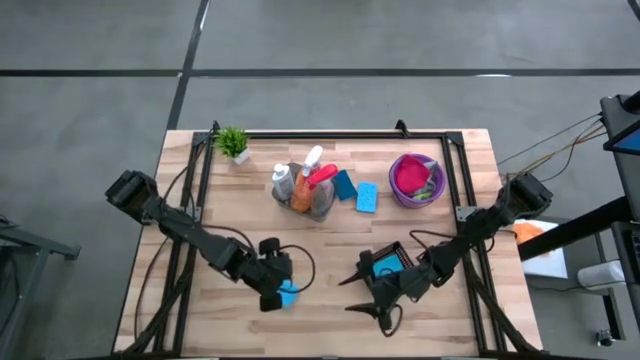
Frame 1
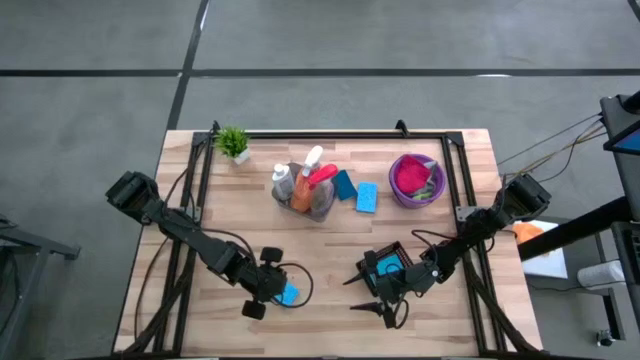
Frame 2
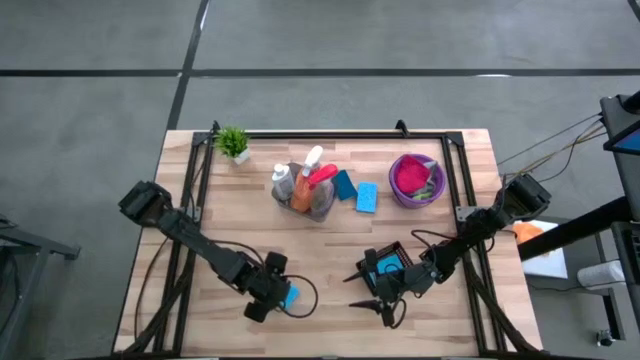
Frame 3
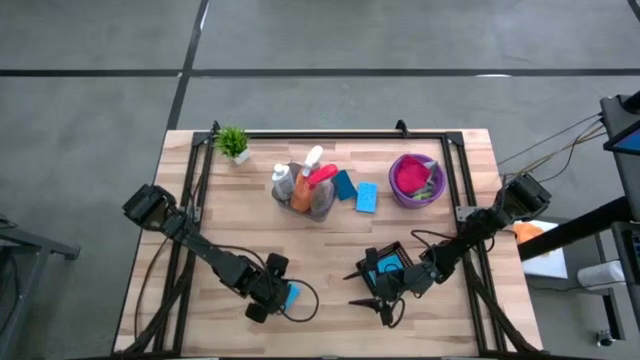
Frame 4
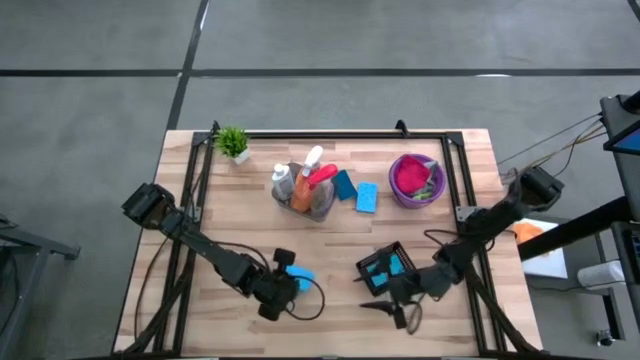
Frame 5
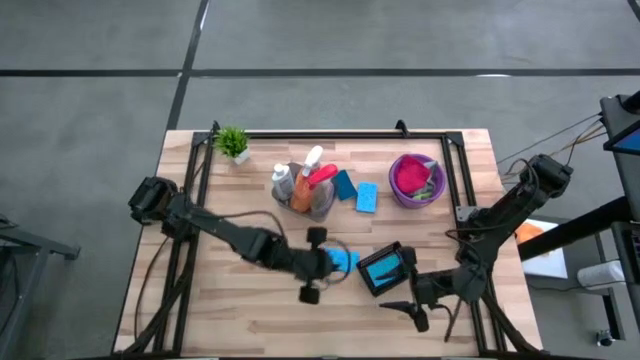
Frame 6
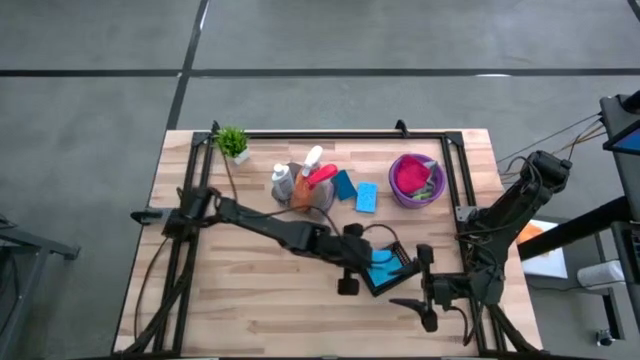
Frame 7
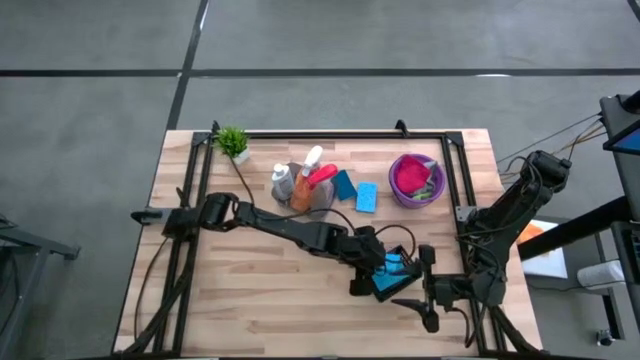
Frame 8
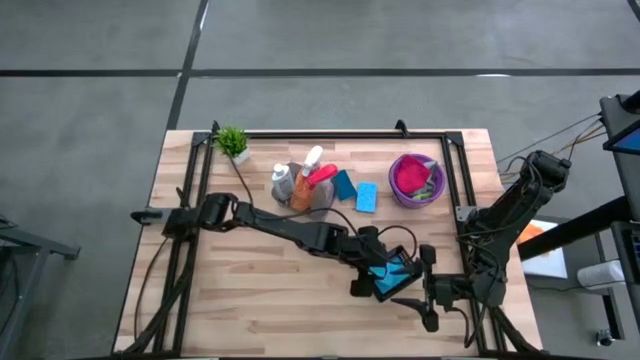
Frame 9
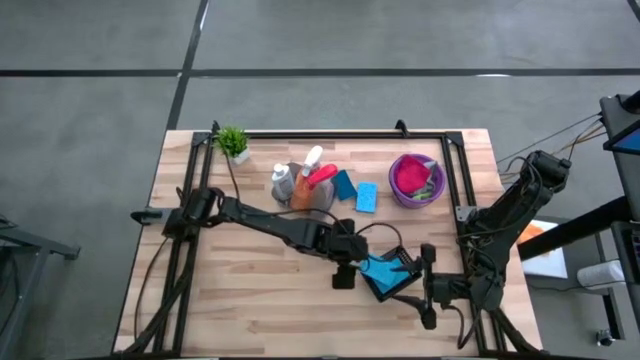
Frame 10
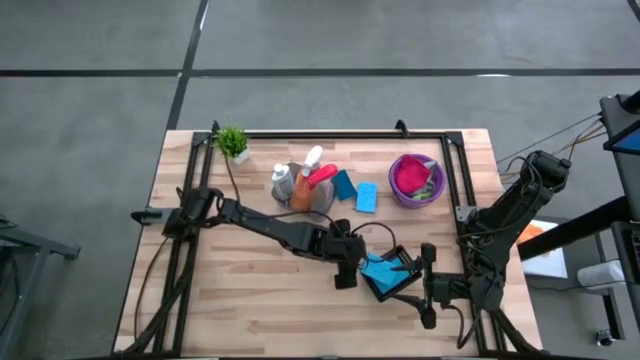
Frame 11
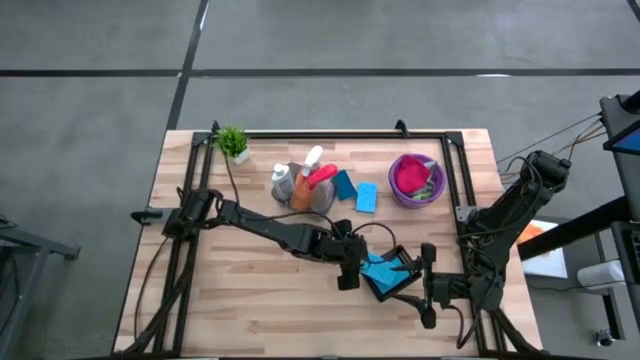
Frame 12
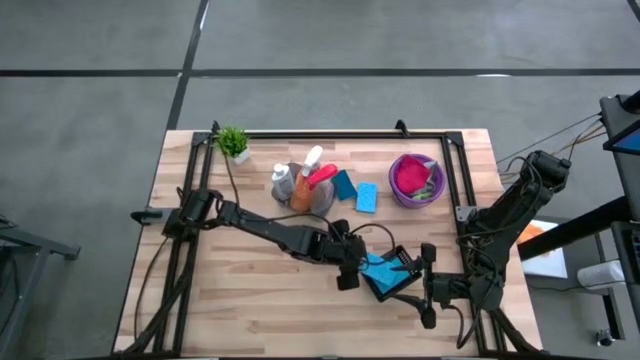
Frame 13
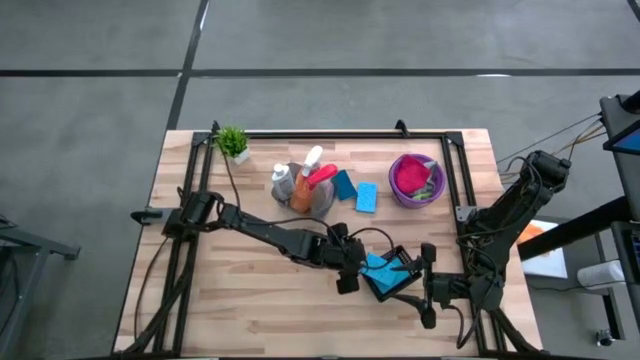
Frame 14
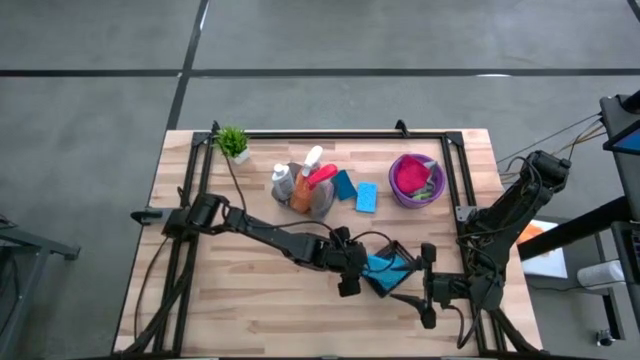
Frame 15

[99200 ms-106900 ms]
Task: Pick & Place Kitchen Items
Put the blue sponge into the black basket

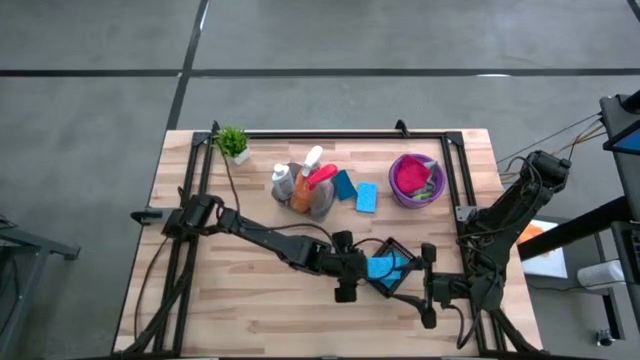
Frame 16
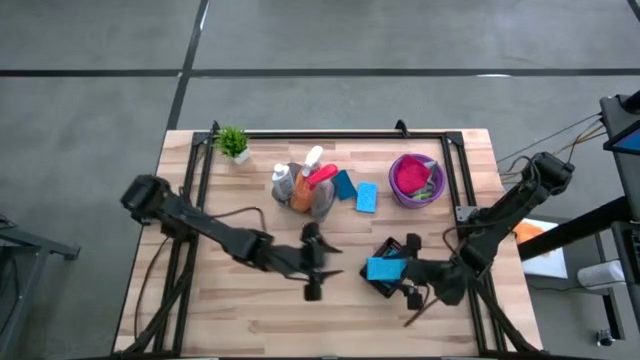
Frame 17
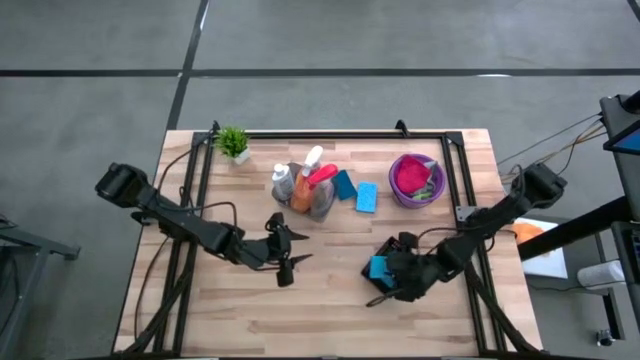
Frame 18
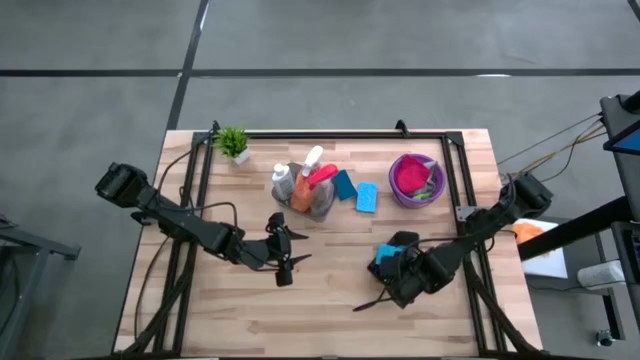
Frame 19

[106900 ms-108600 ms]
Put the blue sponge into the black basket

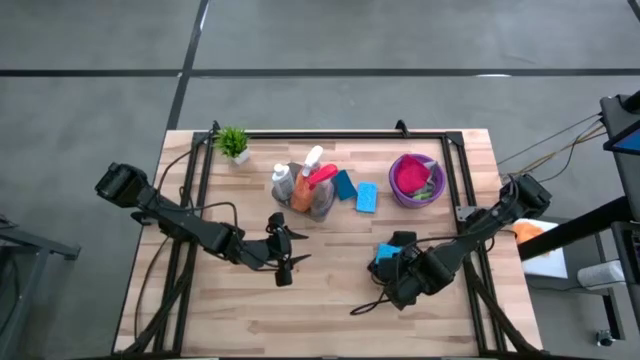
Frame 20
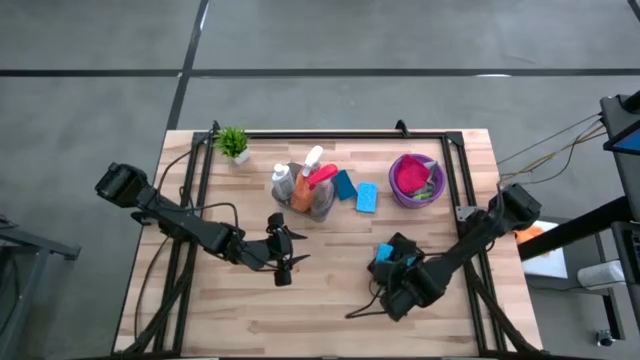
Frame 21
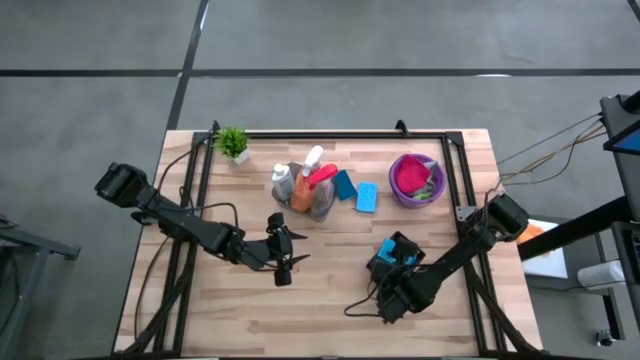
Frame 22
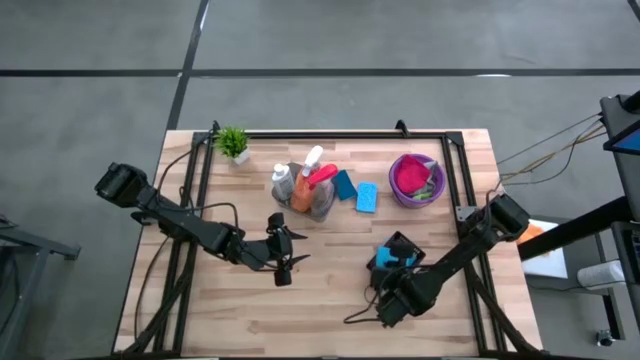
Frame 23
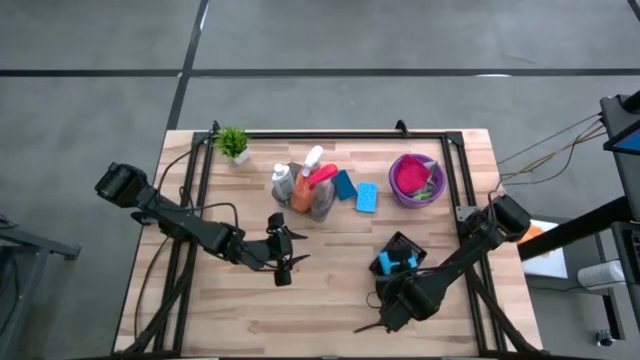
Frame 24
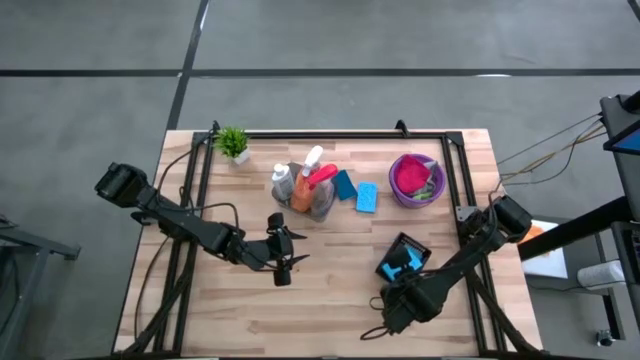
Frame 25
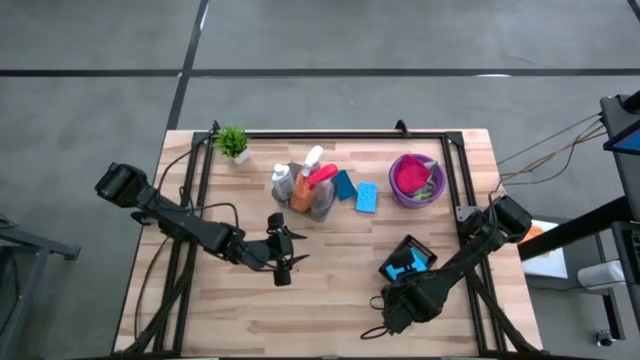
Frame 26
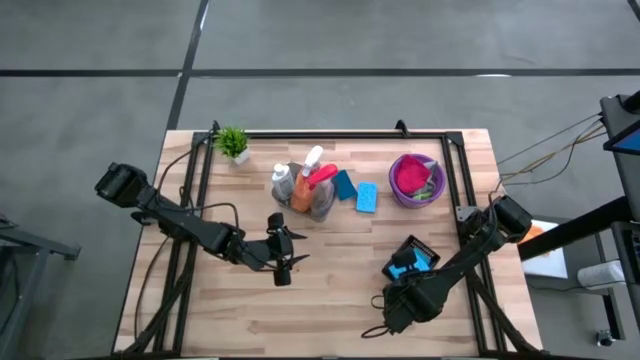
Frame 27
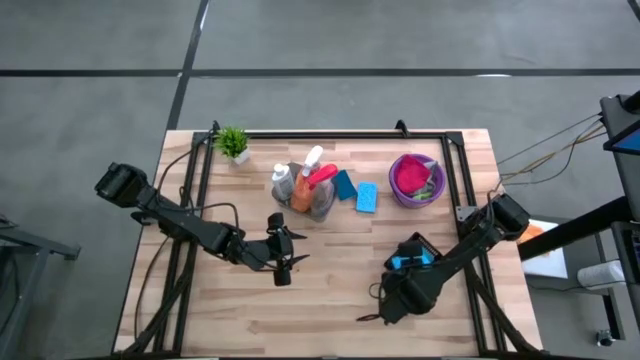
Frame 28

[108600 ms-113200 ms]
Put the blue sponge into the black basket

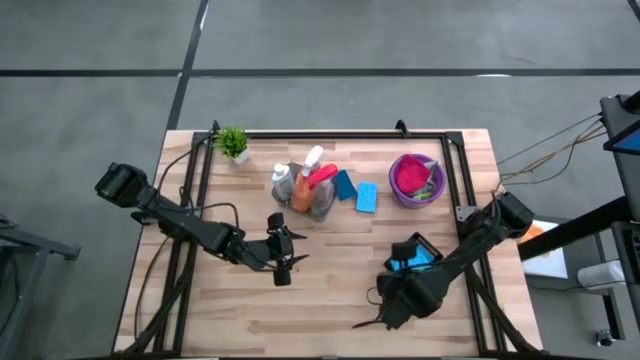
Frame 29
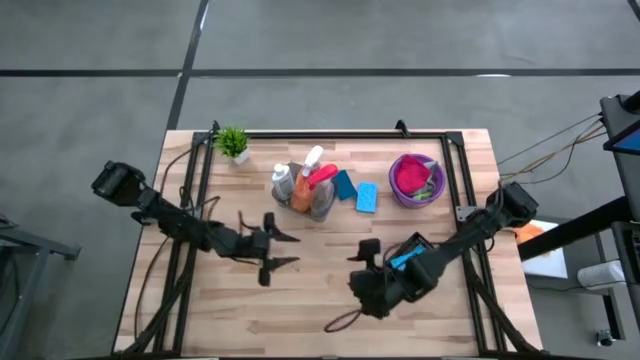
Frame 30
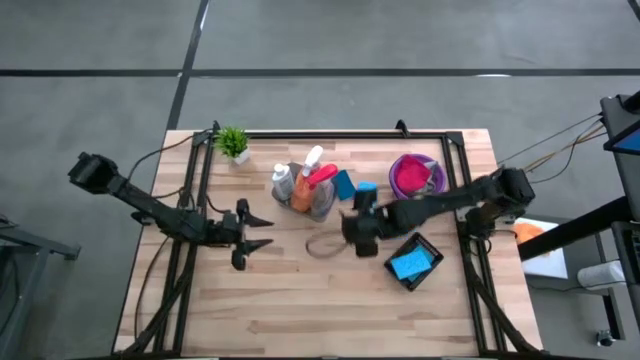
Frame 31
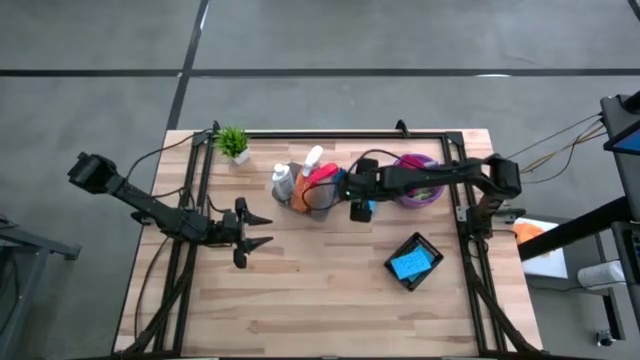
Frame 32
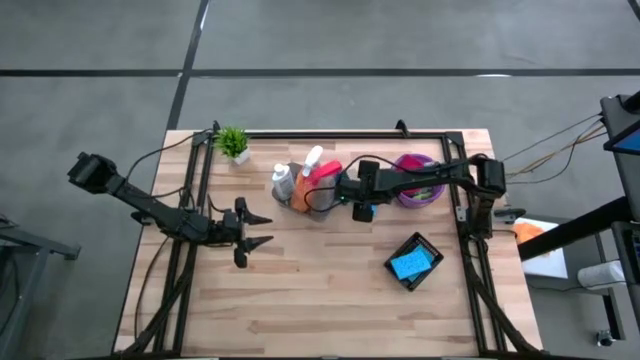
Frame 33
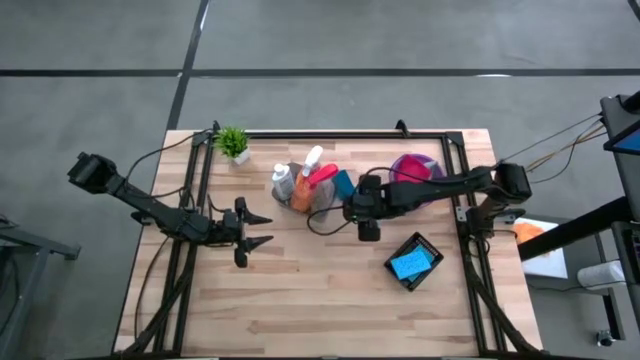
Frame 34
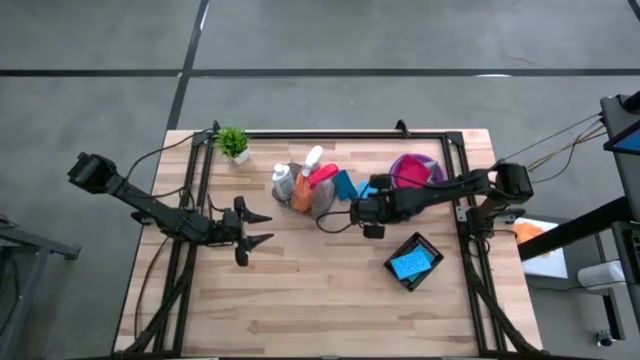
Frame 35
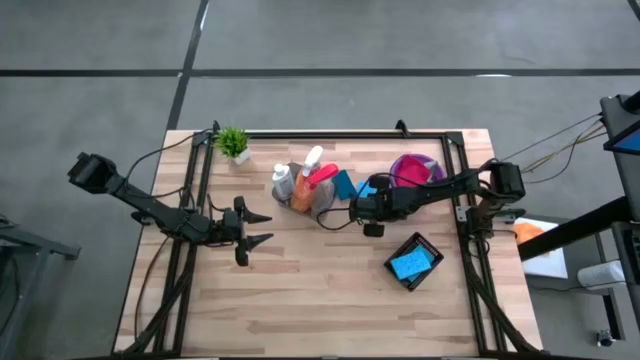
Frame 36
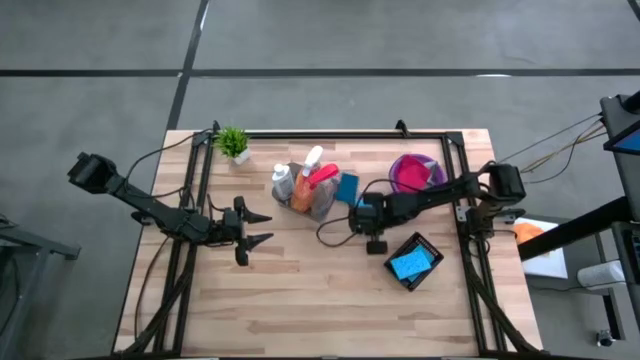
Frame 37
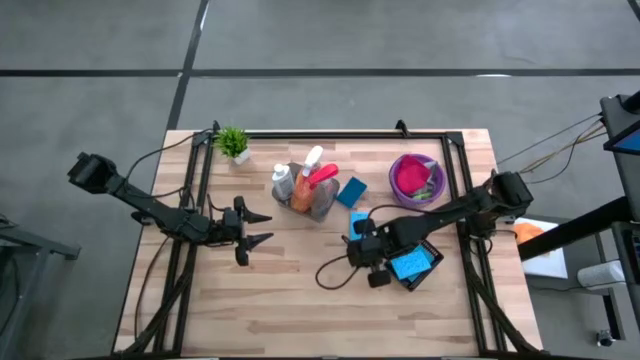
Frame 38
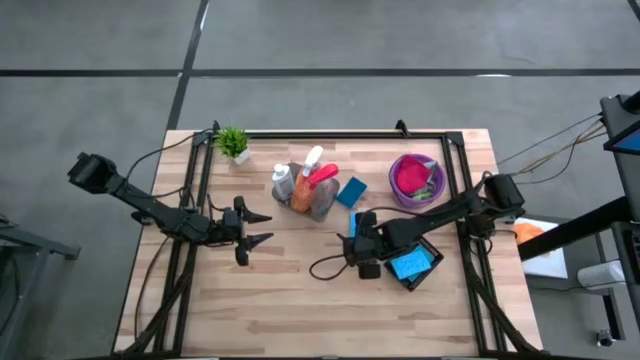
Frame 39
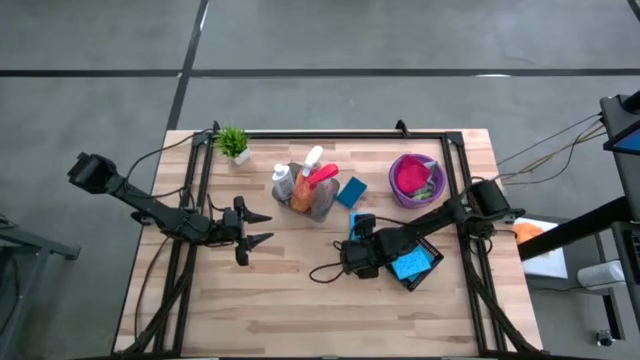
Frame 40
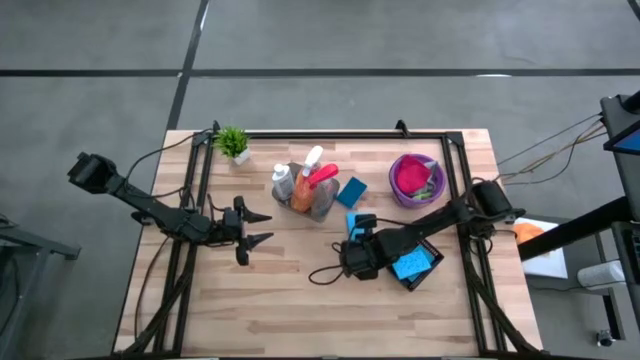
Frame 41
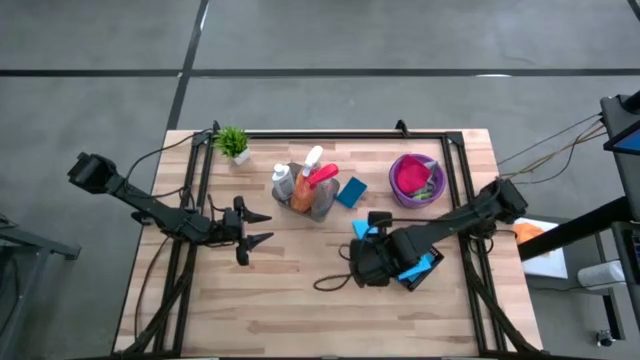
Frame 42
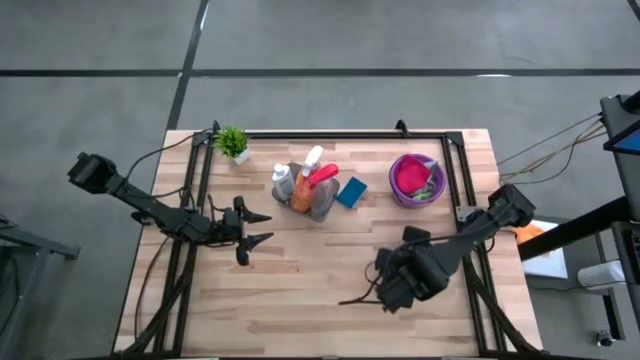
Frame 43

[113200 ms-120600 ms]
Put the blue sponge into the black basket
